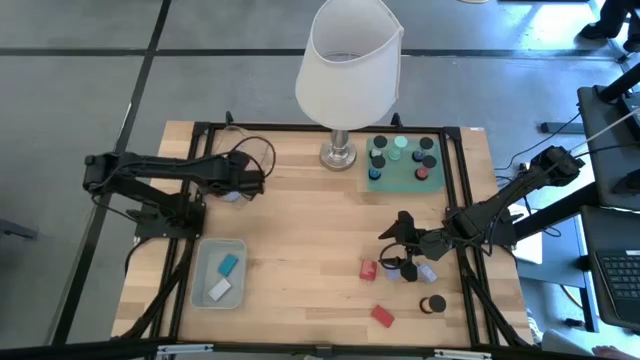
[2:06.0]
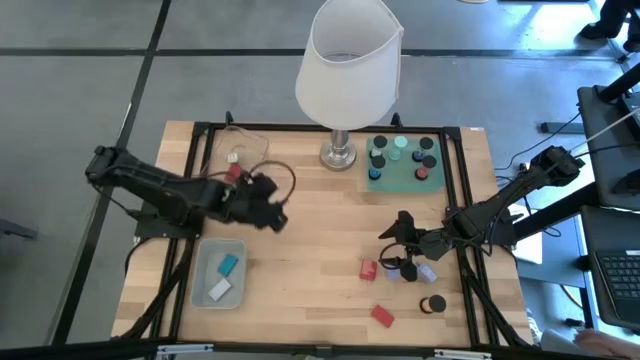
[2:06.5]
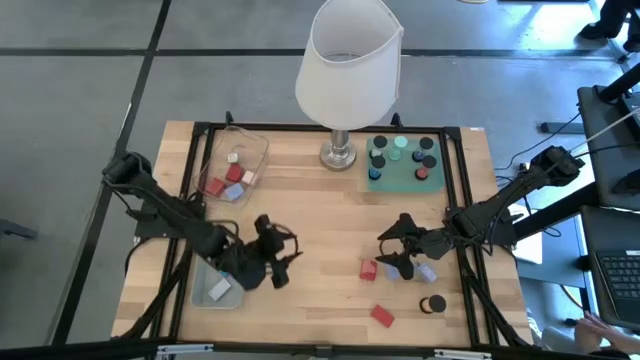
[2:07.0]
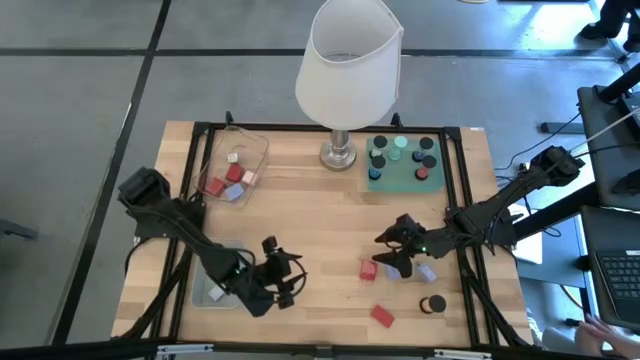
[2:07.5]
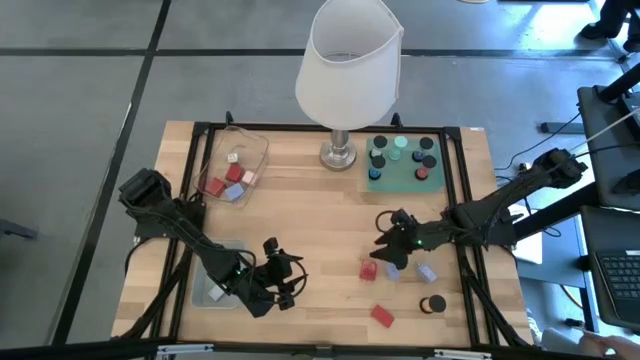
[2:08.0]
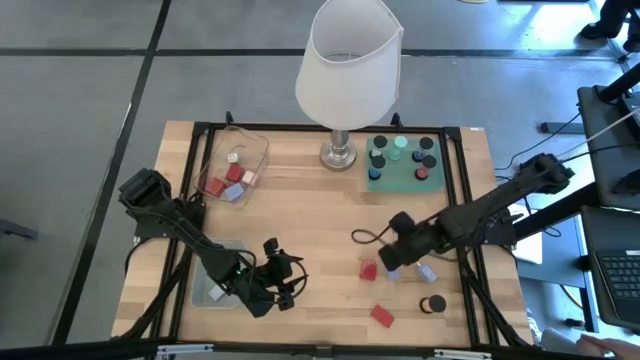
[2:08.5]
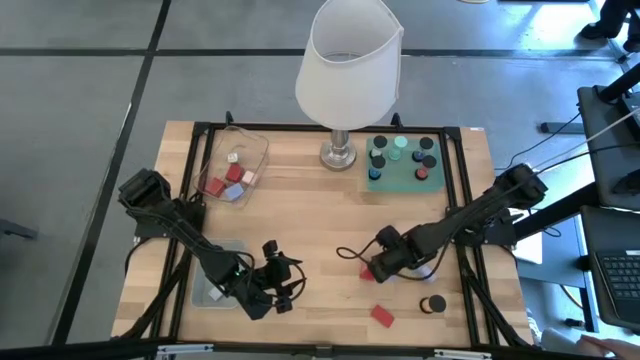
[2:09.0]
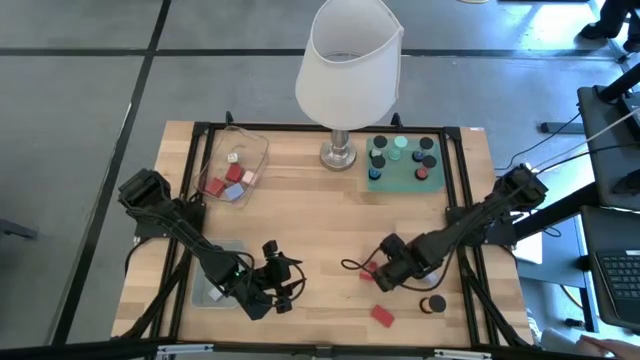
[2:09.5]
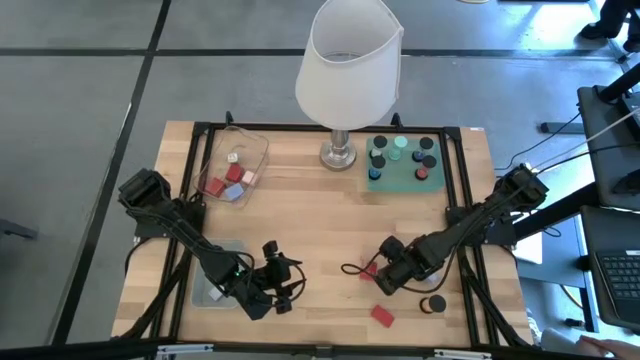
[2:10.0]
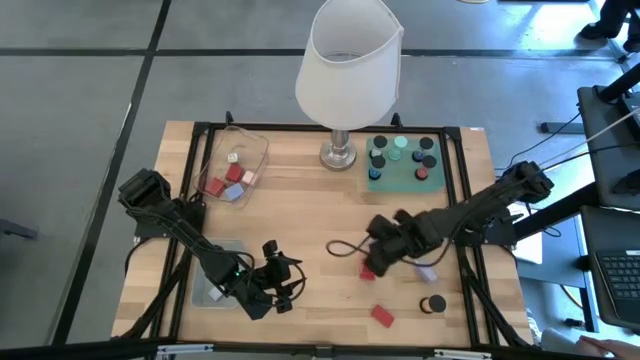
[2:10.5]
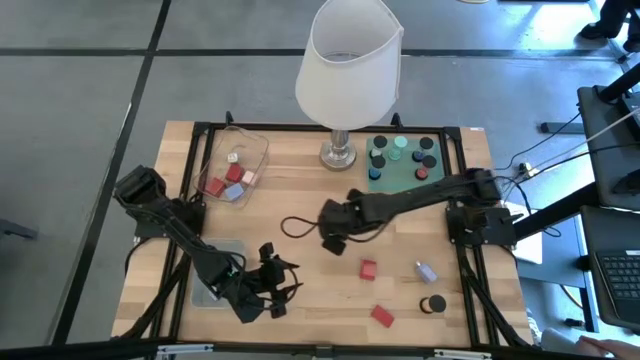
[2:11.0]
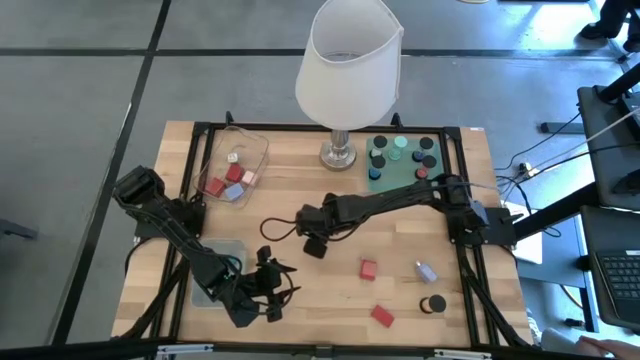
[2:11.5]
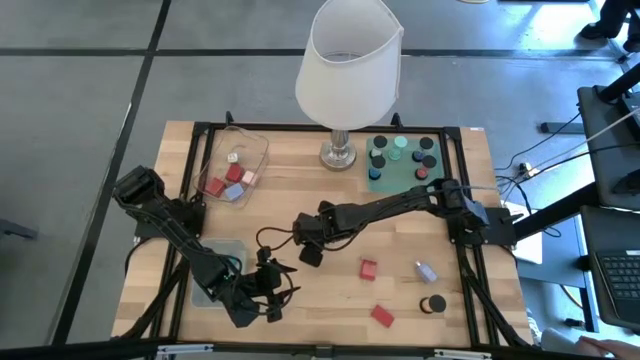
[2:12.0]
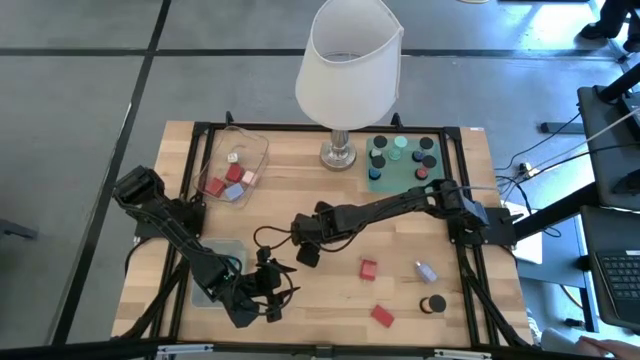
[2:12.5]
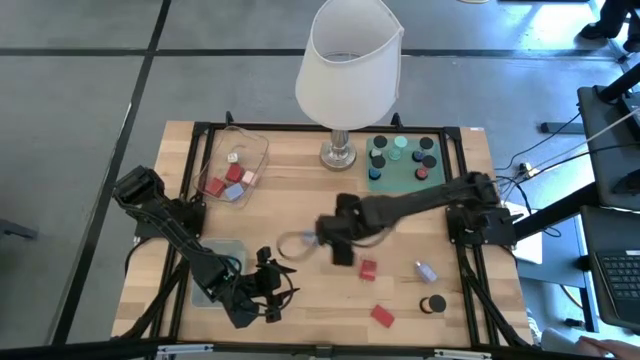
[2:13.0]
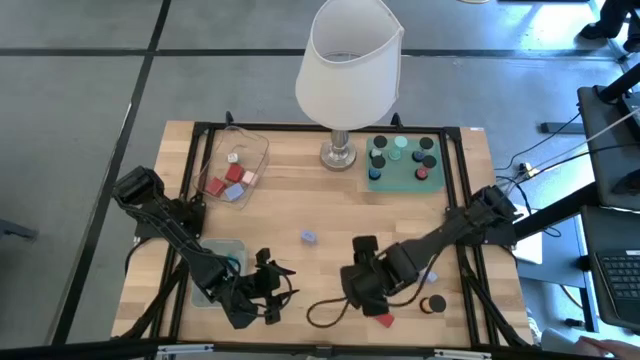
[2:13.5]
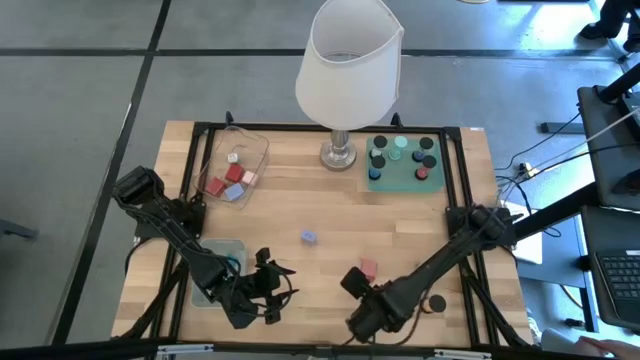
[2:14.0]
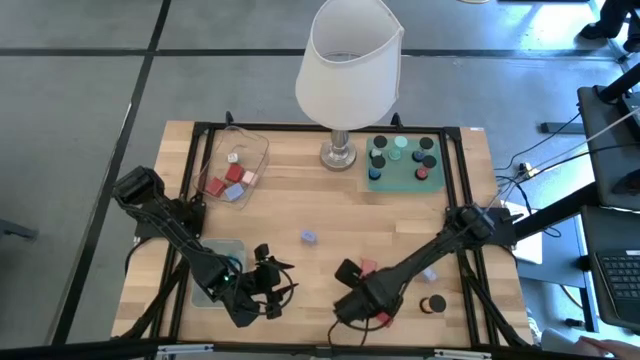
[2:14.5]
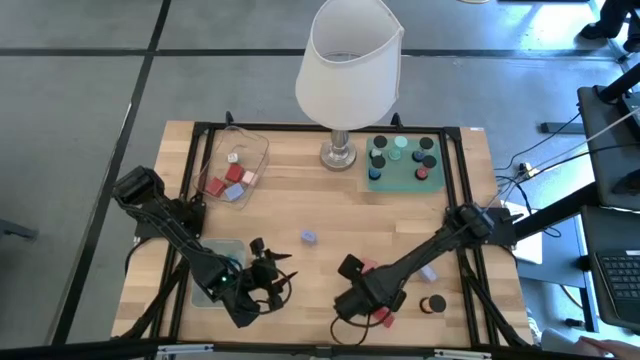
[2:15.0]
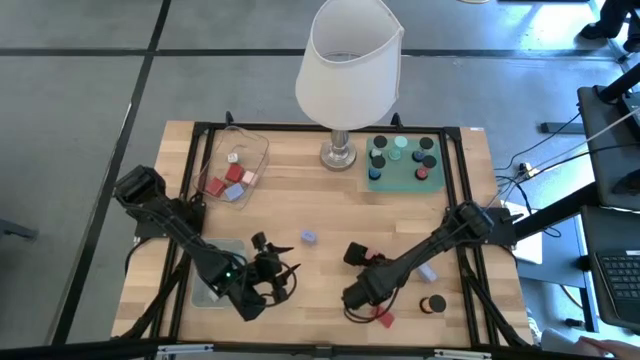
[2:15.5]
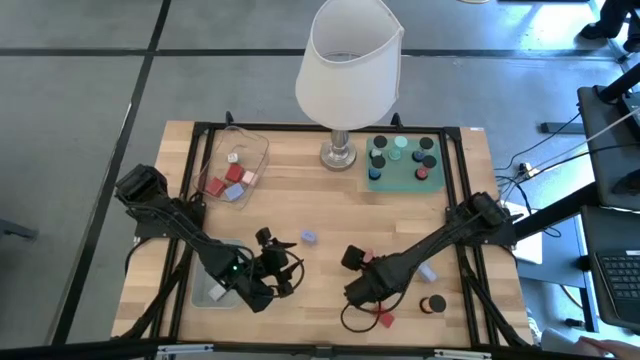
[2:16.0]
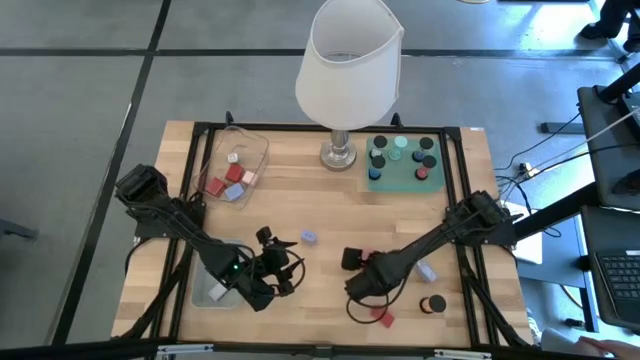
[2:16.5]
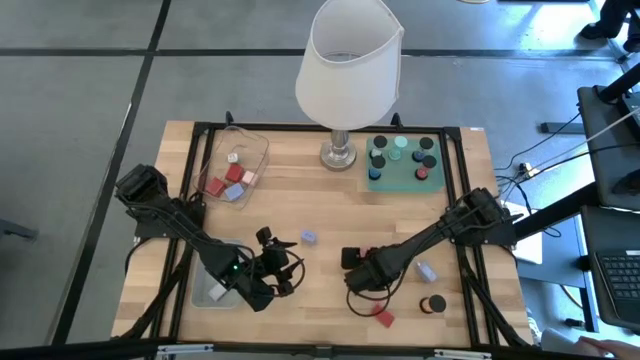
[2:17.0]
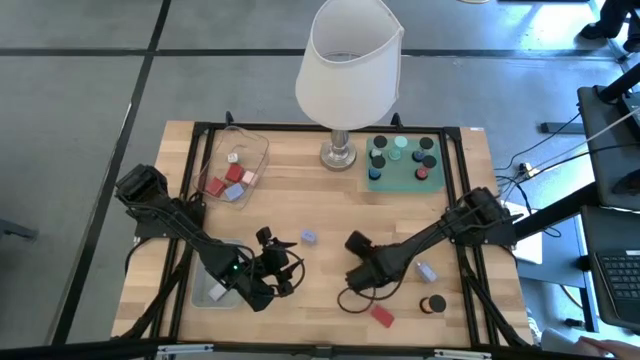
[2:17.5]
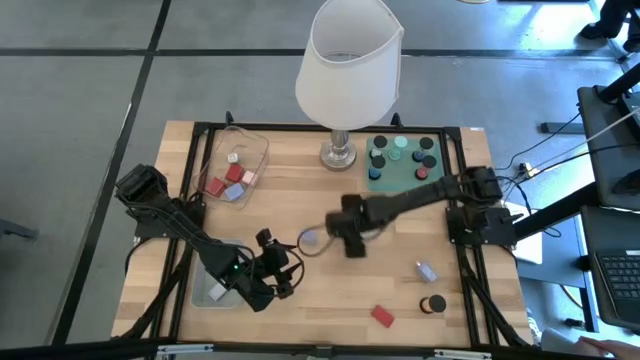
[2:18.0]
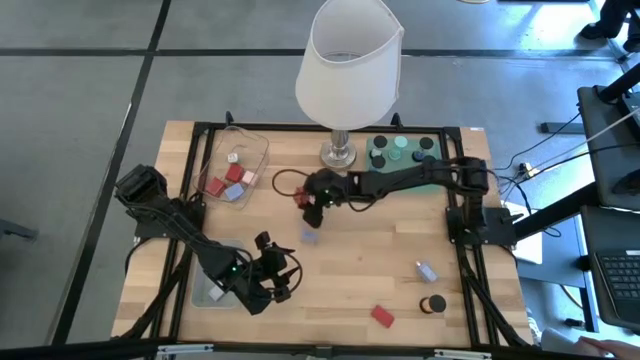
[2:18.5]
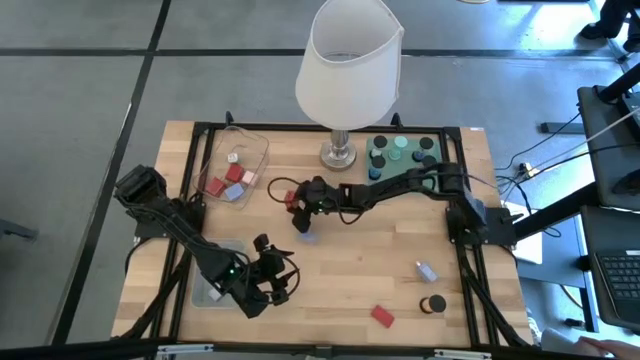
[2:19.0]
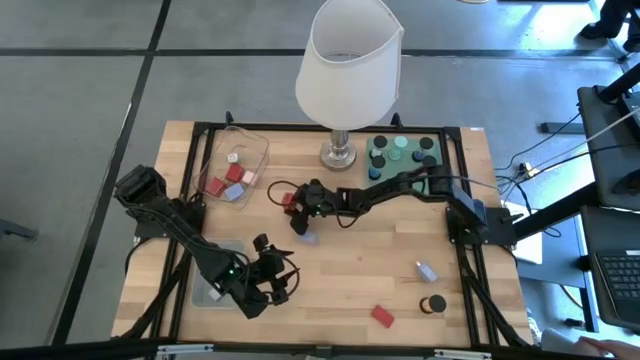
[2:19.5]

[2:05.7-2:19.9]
Task: Pick & Place Office items
Move the light blue and red charger adapters to the center of the table

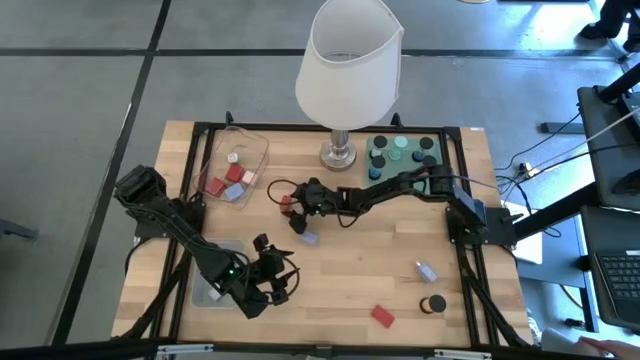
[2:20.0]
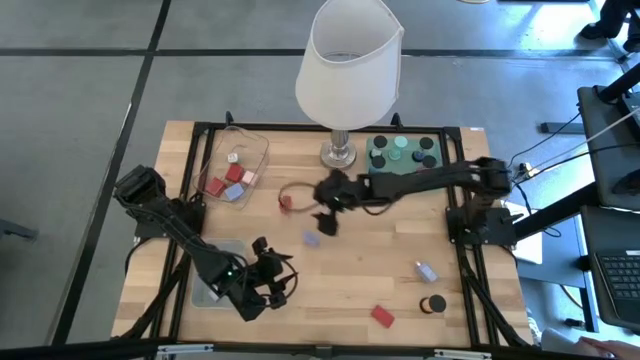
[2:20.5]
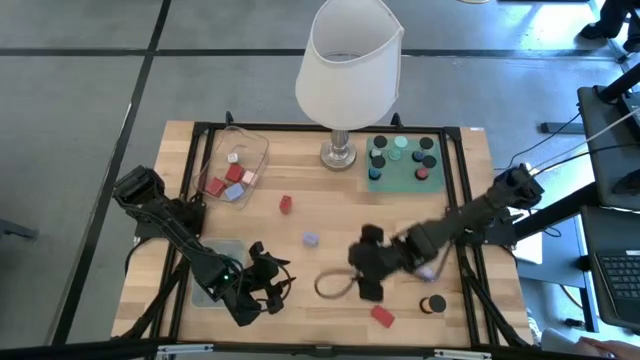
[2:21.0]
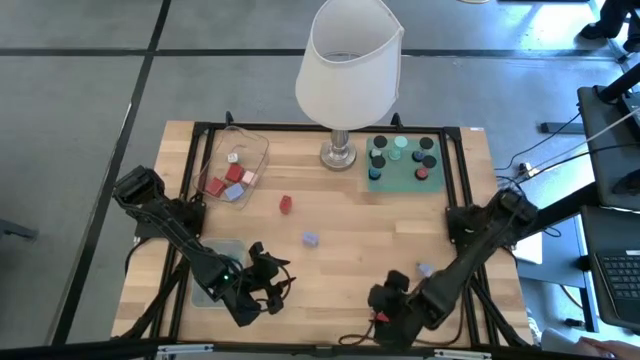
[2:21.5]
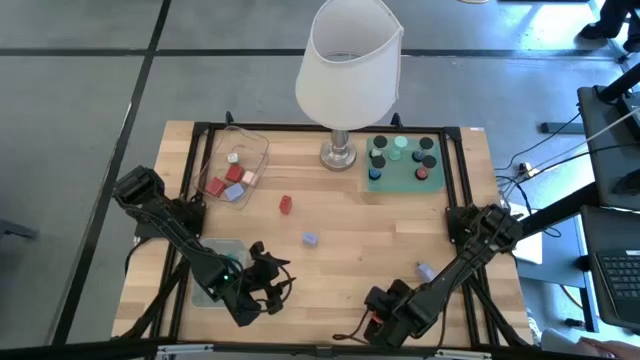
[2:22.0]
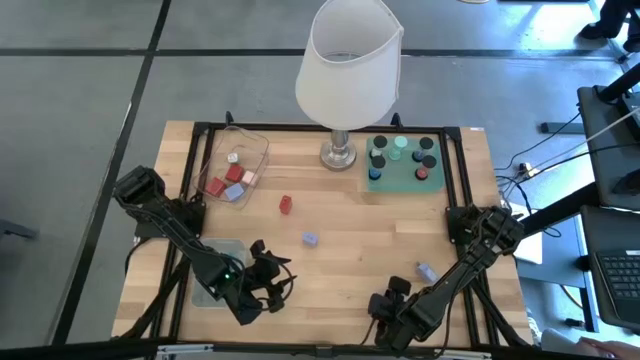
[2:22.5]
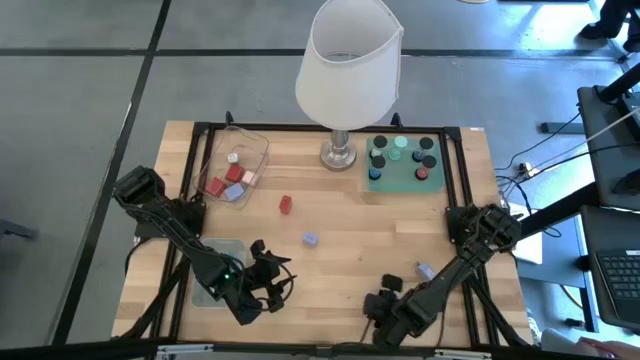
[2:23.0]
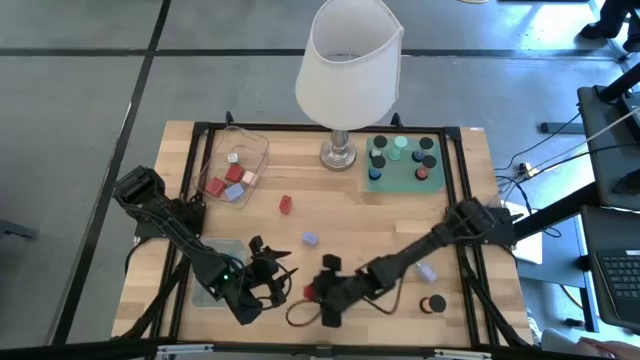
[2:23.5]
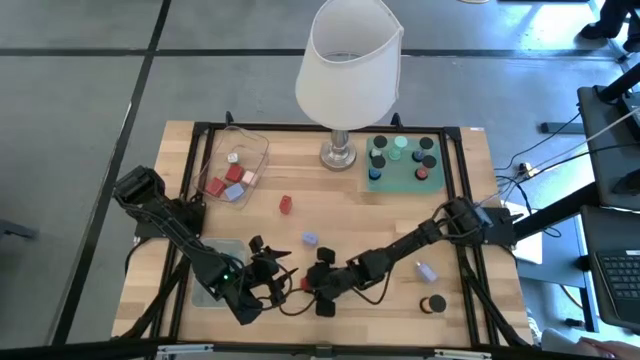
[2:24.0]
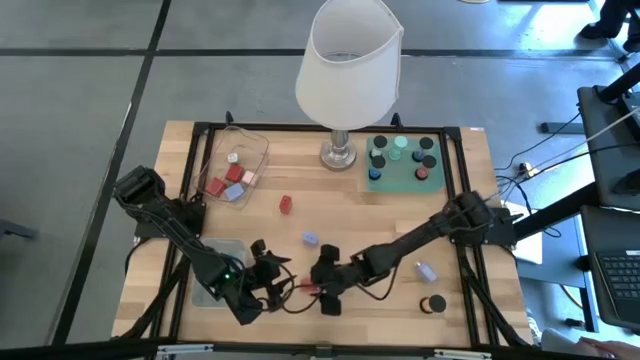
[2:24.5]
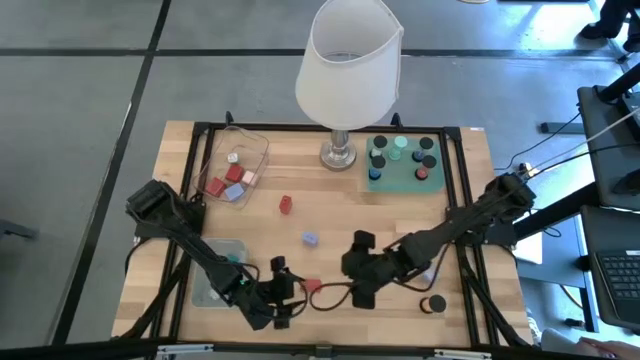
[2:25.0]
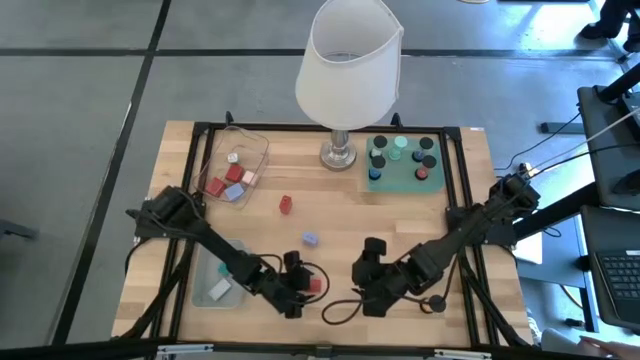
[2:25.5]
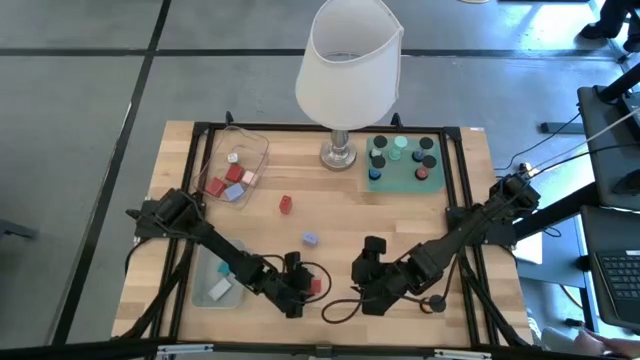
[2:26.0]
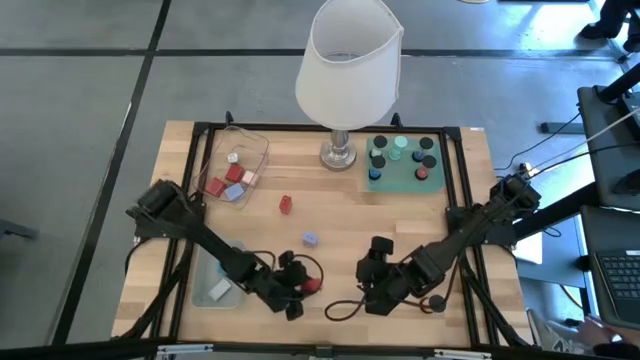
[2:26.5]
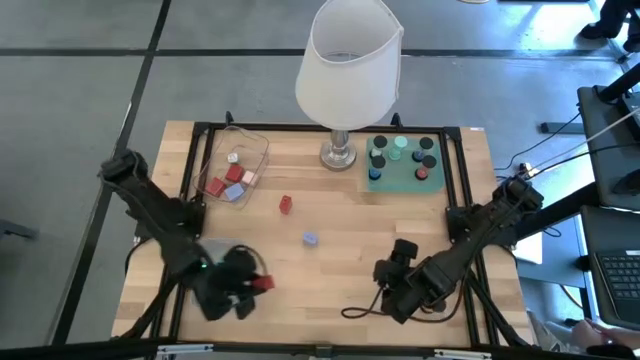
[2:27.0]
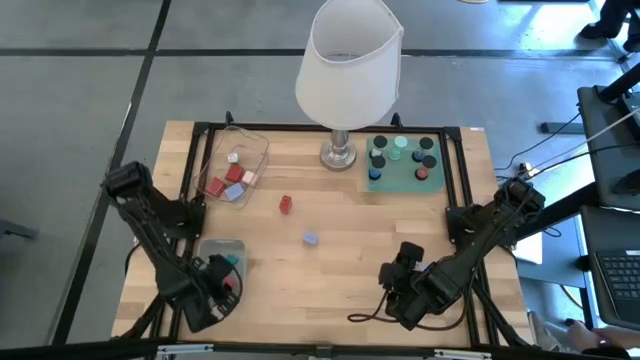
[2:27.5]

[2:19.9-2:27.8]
Put the red digital timer into the gray bin
